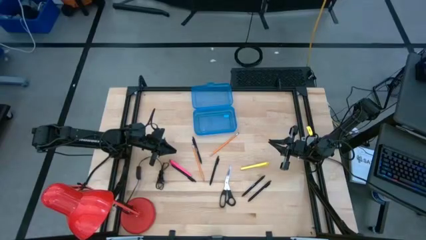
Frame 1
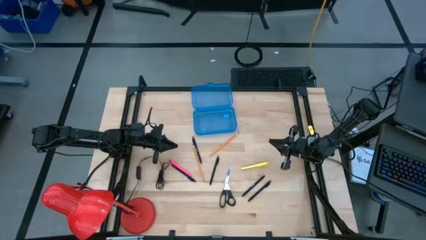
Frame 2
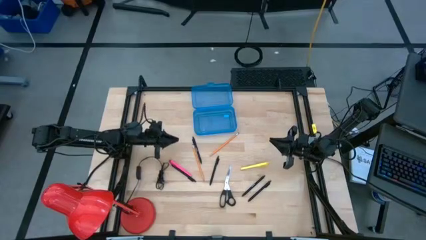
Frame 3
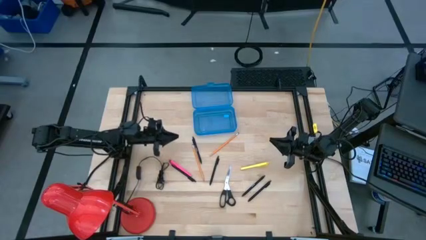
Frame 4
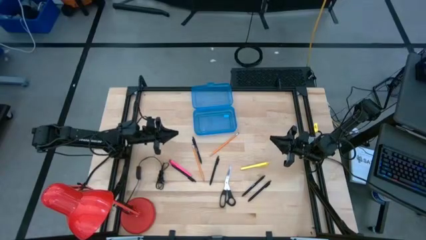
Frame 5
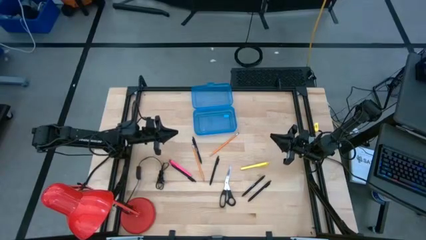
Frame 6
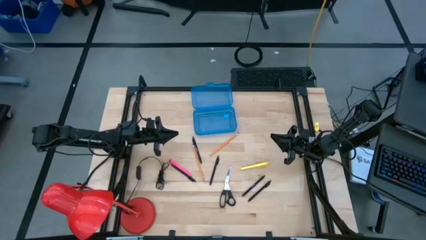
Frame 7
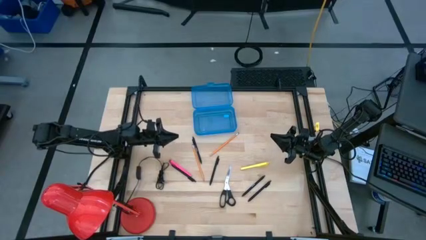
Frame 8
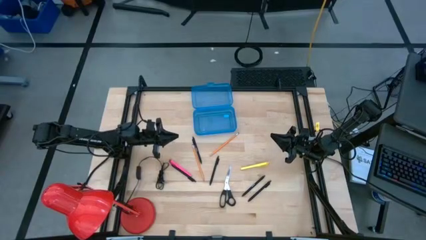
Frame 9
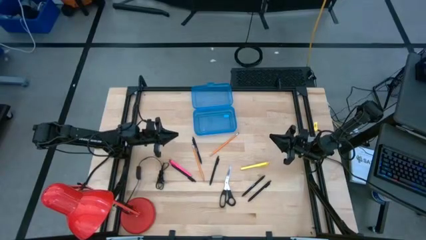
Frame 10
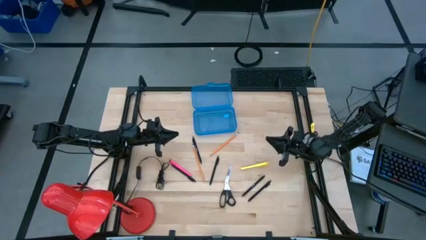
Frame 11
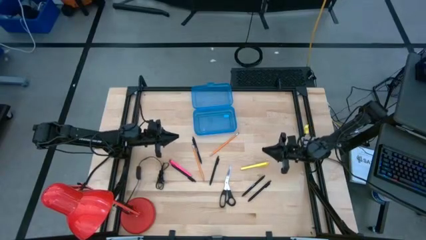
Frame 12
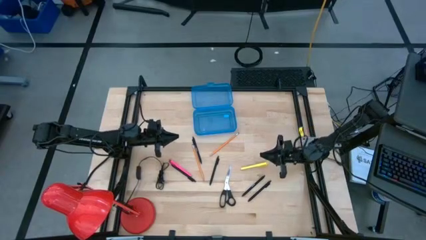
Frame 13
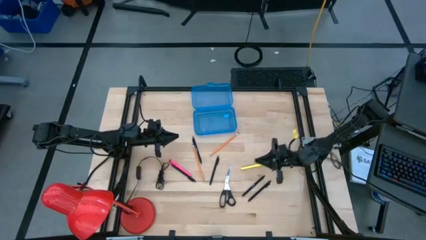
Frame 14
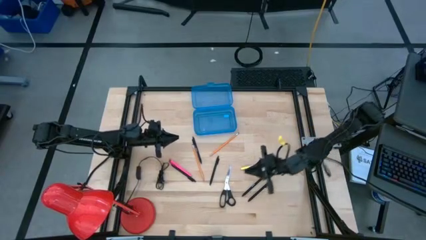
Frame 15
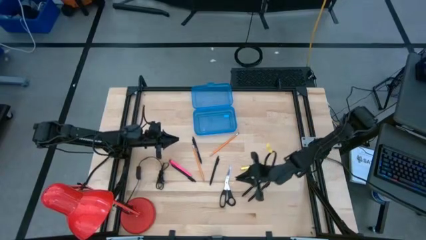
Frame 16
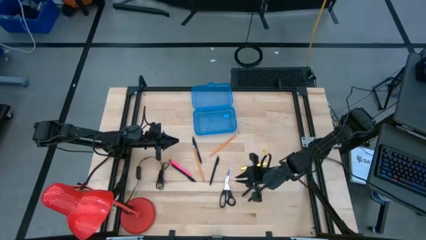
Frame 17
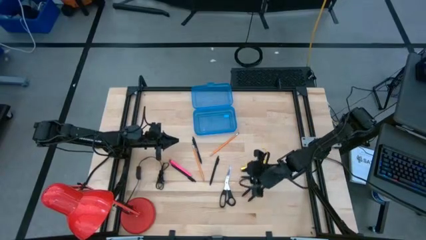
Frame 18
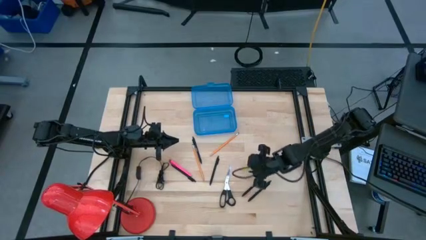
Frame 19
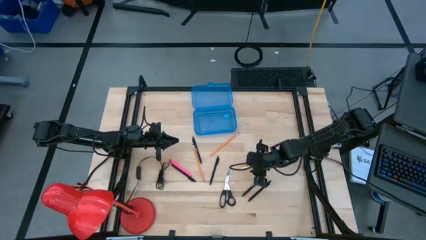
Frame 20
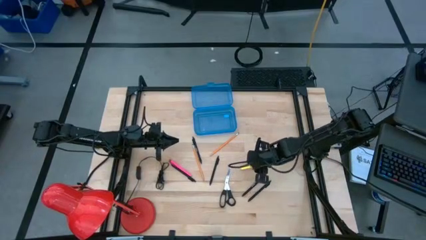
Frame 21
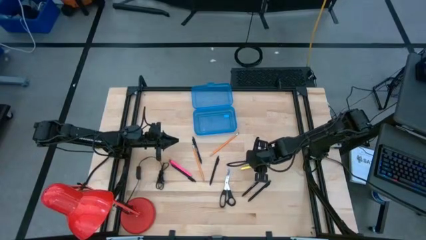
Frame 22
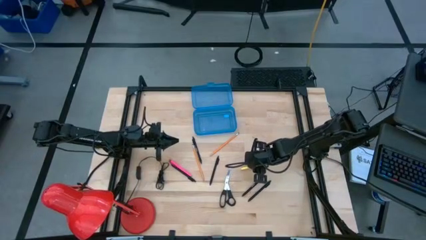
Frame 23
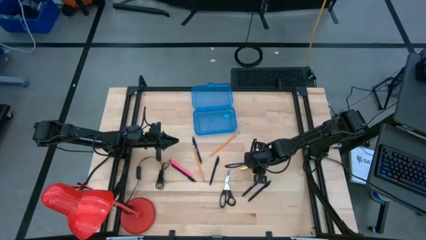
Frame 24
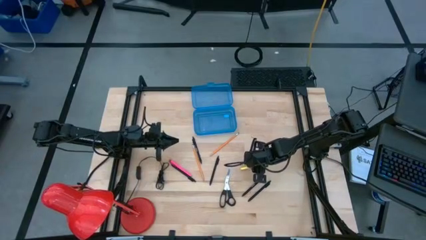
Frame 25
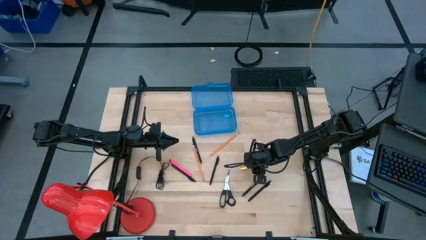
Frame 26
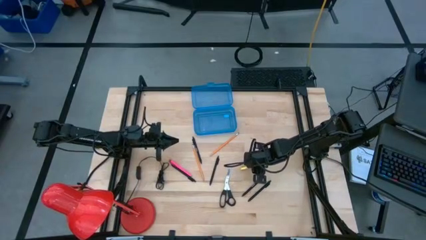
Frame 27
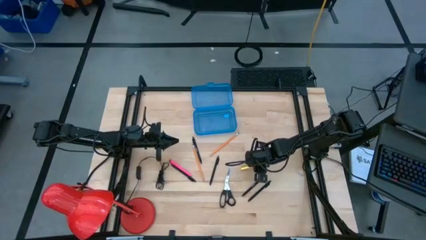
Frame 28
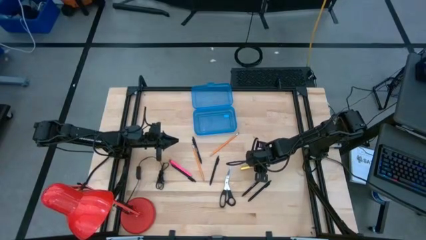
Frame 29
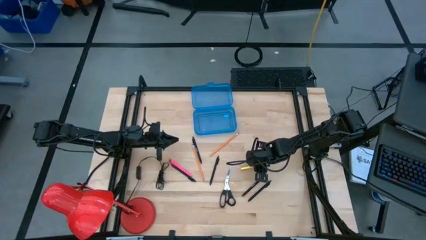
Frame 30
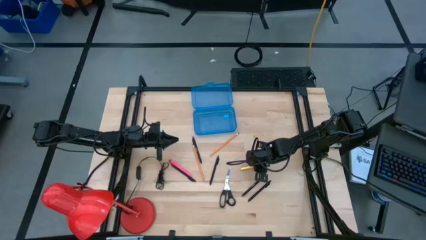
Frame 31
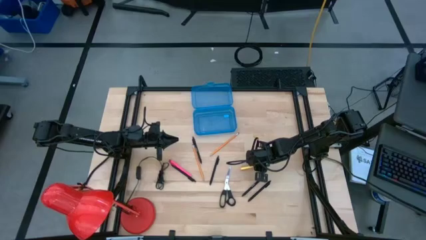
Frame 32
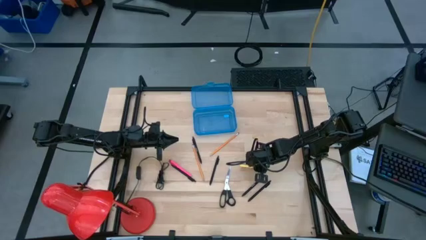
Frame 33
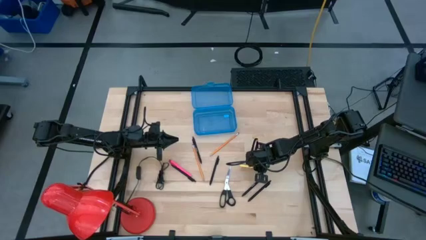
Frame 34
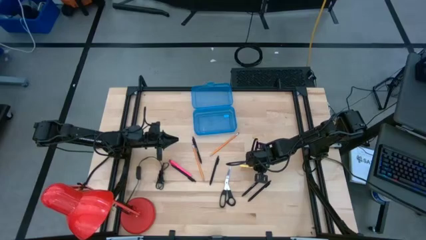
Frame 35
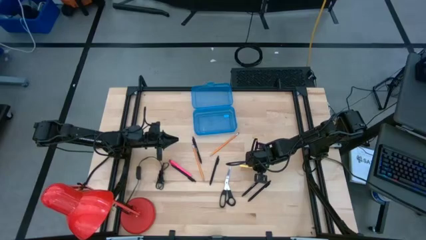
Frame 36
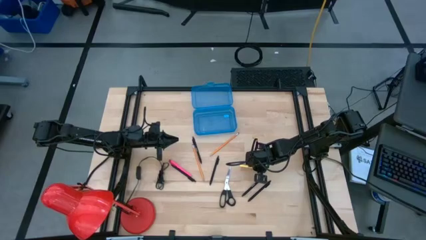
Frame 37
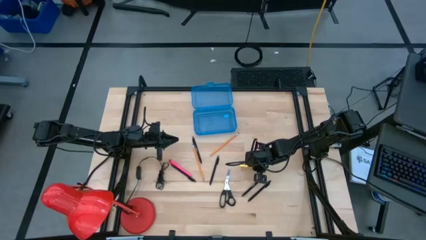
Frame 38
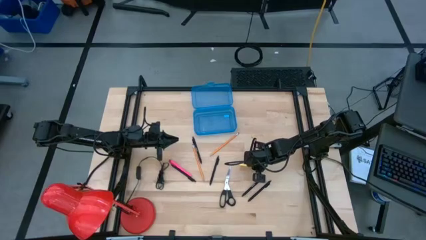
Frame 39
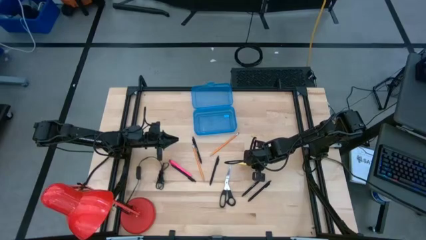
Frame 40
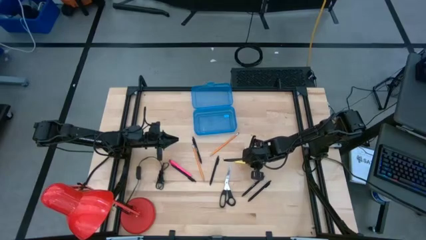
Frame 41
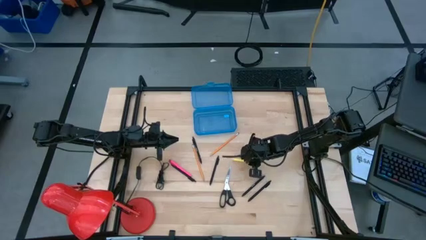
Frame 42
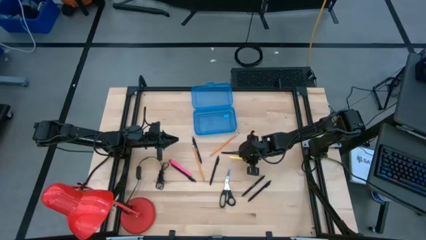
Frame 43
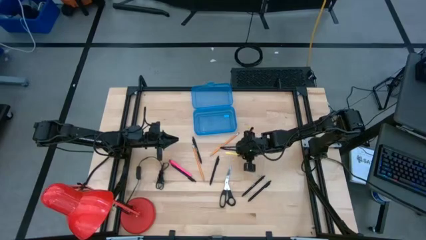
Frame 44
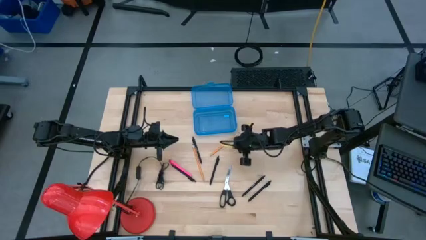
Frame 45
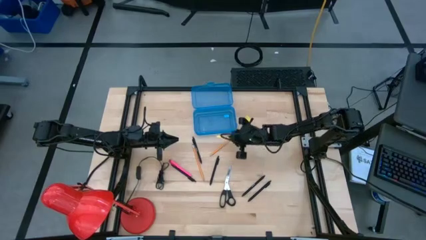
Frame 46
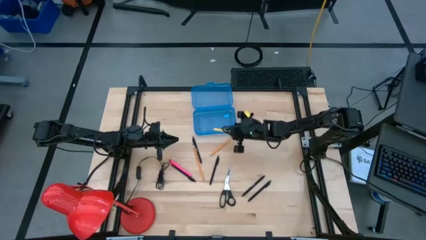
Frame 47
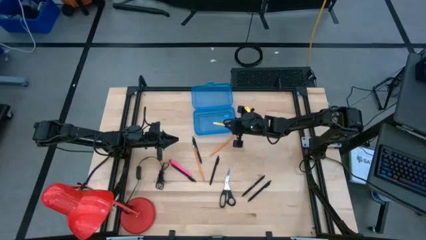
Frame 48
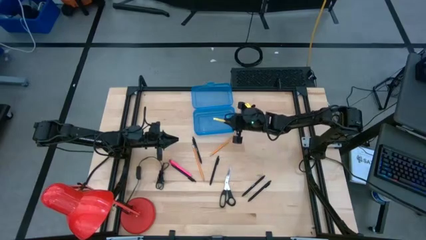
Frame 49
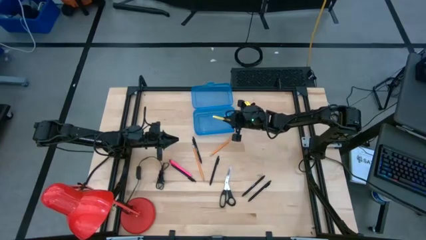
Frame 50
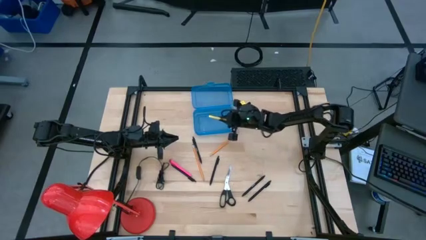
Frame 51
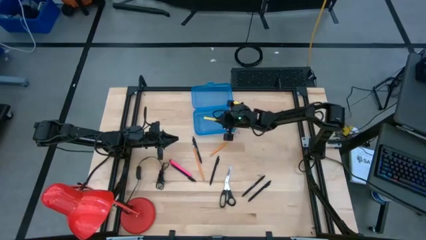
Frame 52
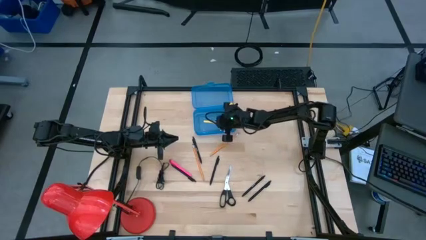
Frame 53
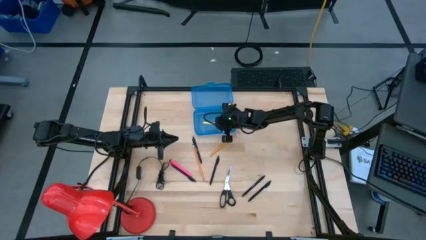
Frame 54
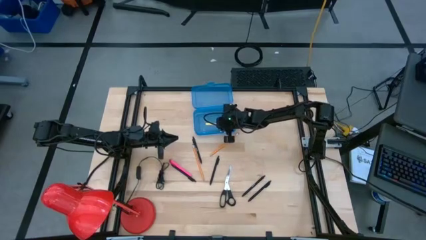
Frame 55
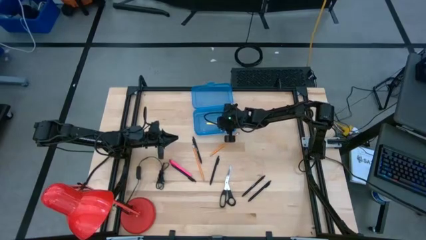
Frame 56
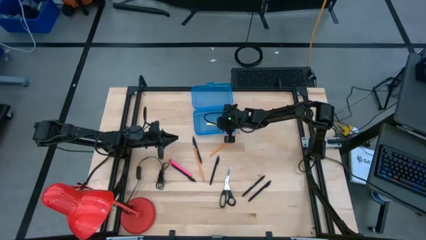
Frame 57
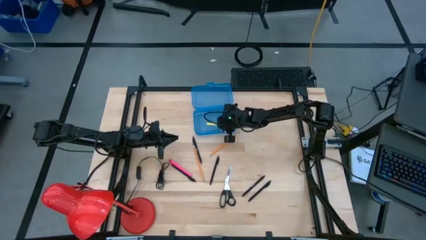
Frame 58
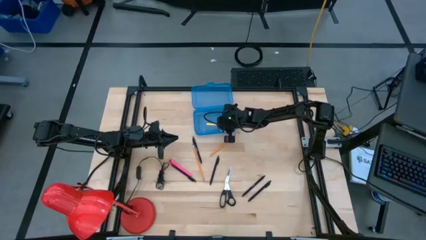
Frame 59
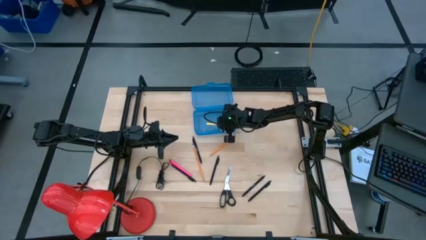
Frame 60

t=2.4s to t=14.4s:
Task: Pick & place school supplies into a supply box
Put the yellow pen into the blue supply box

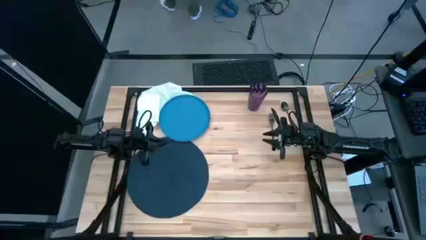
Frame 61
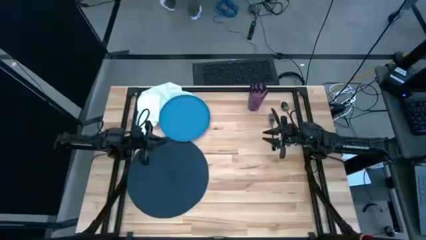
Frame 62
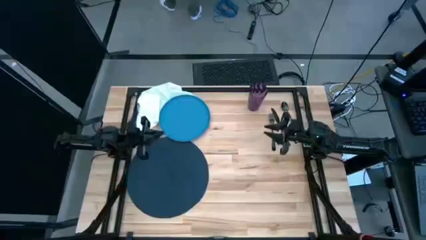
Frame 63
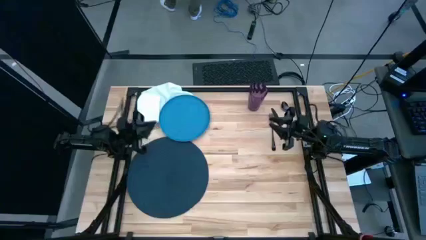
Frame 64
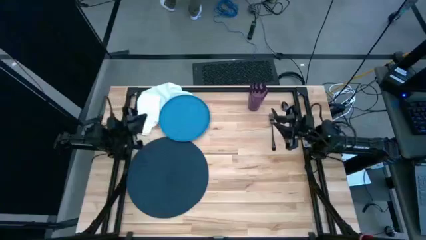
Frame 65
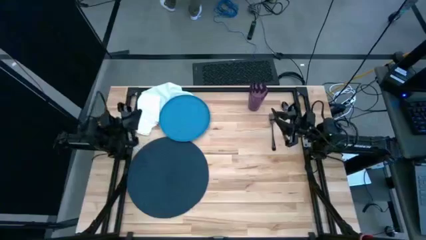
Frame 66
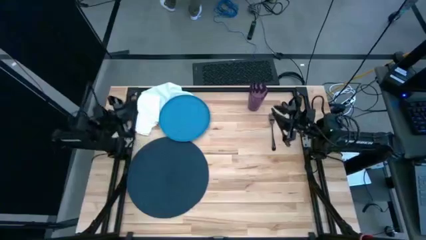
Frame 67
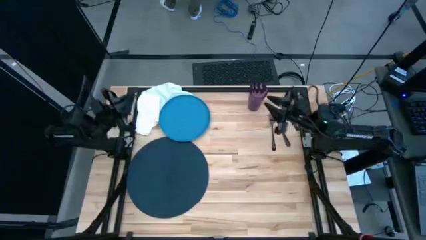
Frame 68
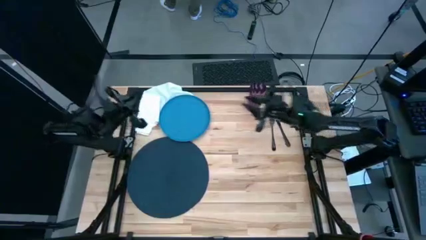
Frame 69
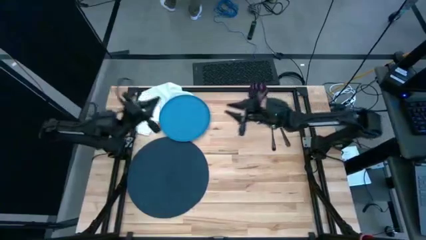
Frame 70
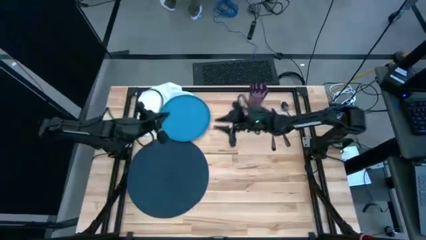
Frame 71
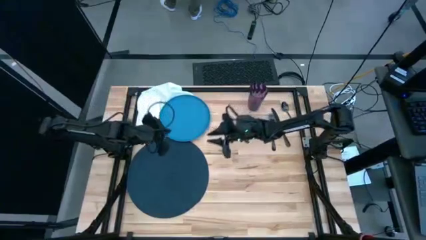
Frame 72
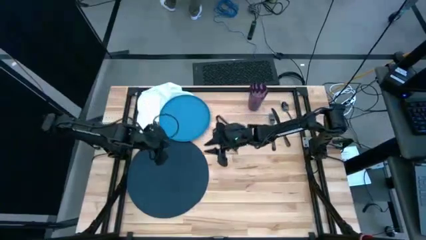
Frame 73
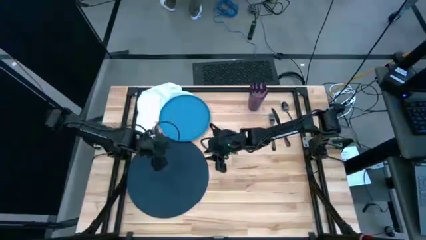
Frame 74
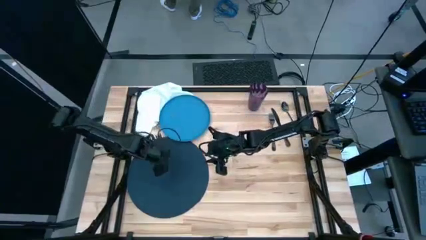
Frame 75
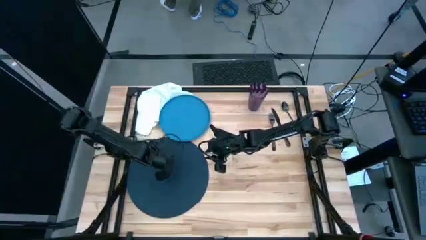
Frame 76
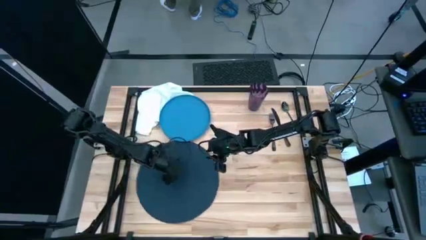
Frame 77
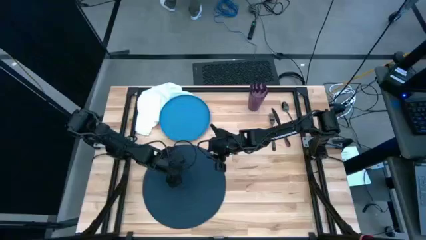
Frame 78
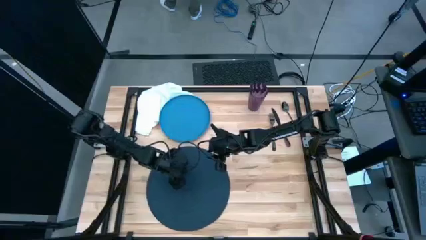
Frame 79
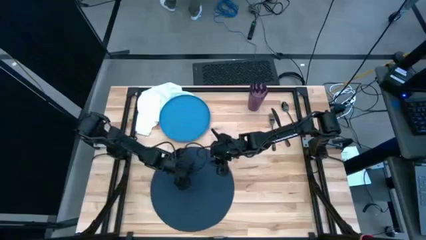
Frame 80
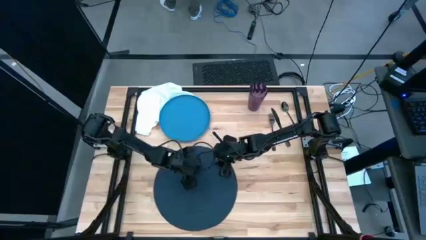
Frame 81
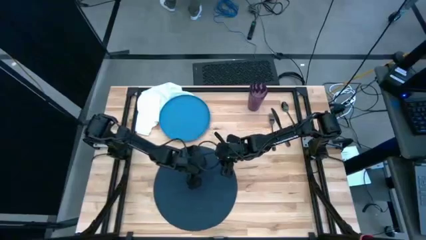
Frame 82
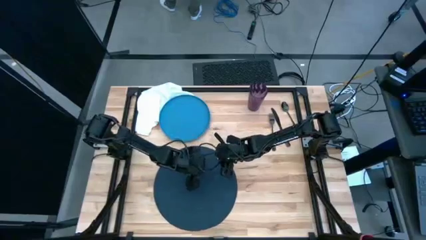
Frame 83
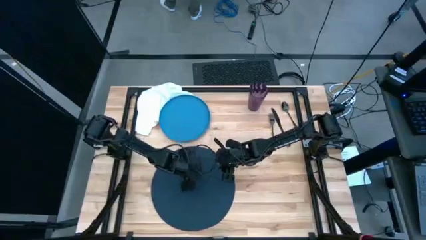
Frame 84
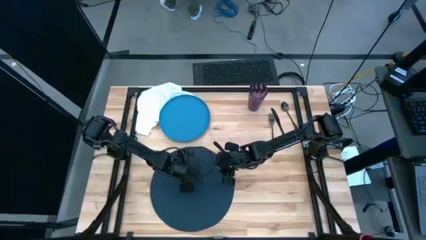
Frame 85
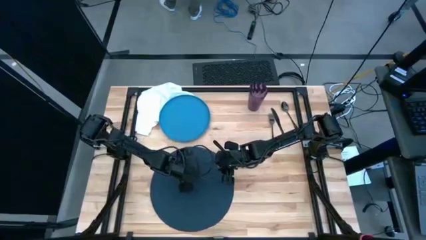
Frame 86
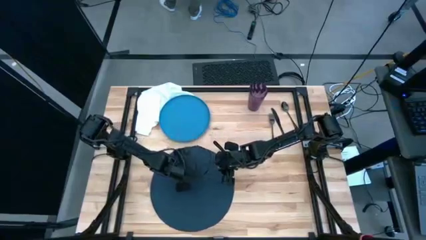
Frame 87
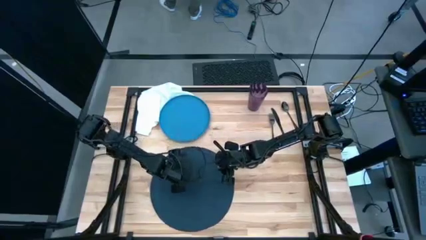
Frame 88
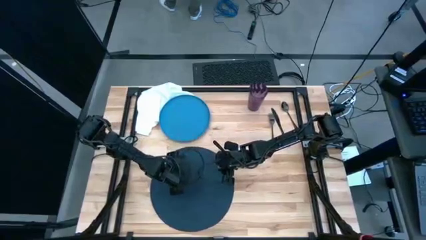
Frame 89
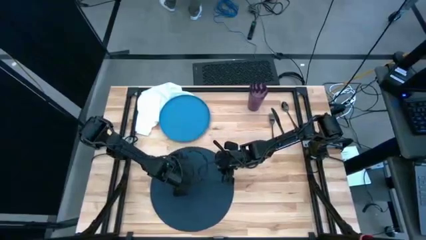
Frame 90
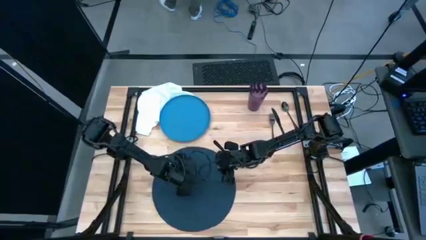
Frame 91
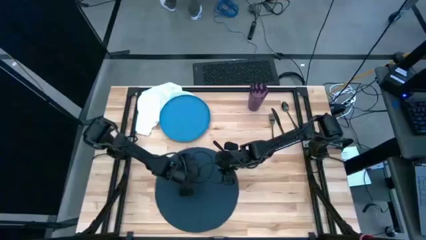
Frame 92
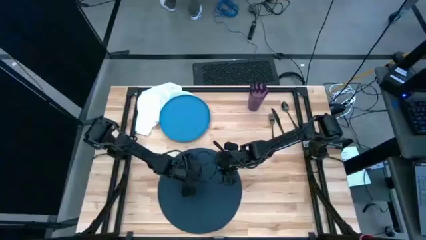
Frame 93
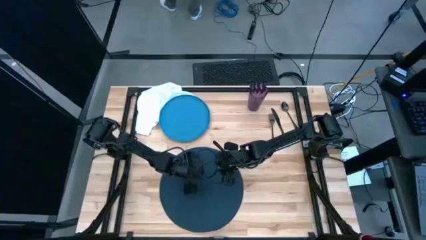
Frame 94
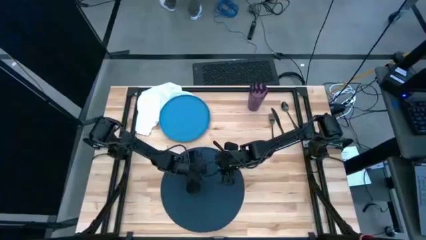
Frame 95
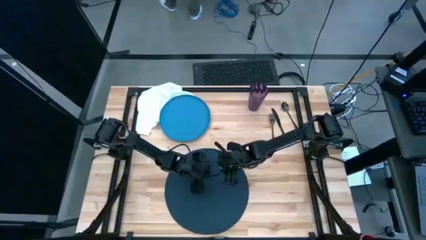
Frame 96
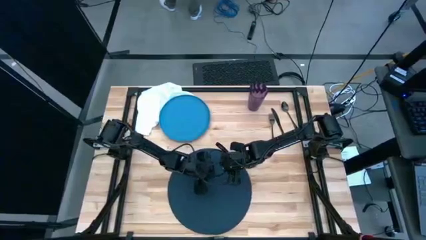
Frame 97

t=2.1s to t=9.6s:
Task: Set table place
Move the placemat to the bottom-center
